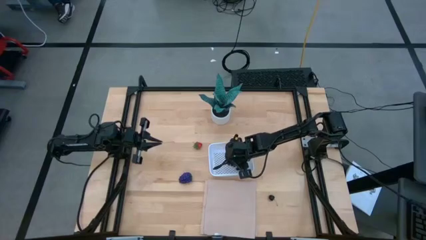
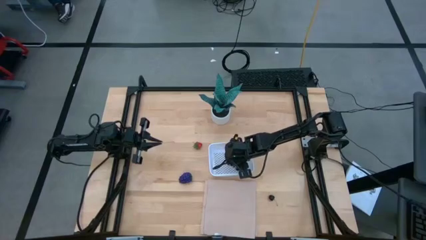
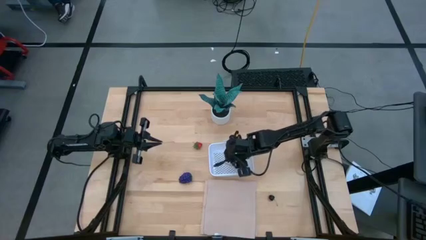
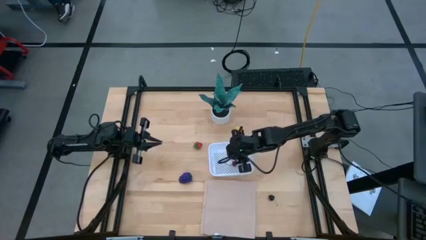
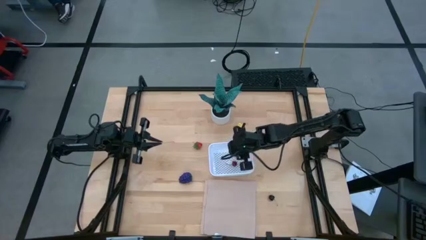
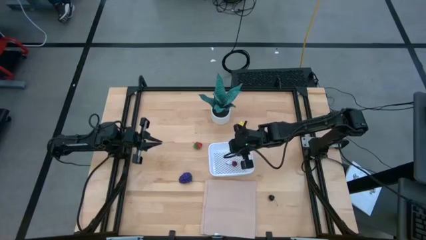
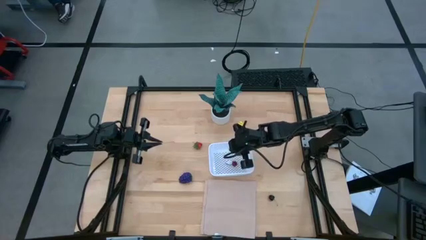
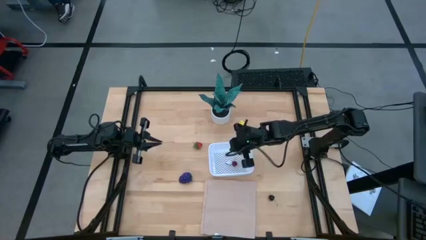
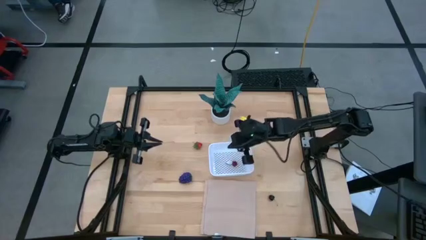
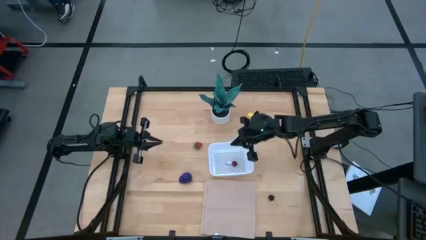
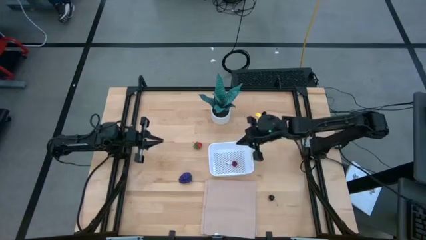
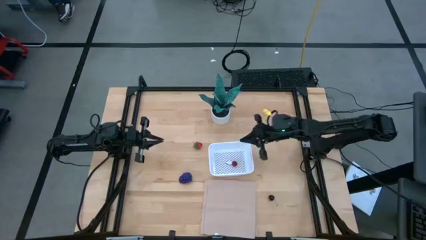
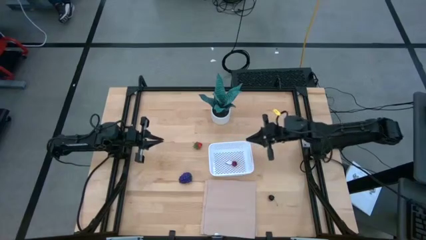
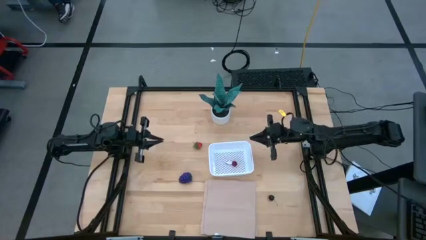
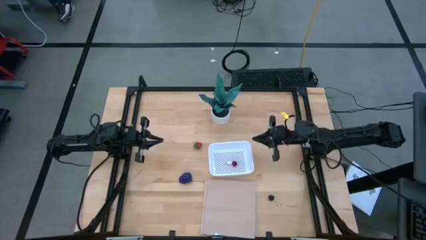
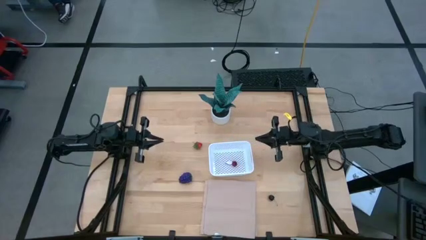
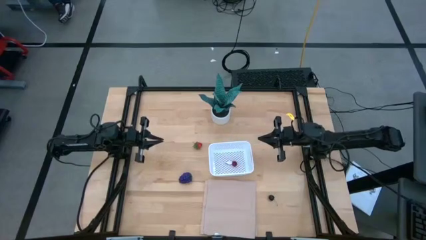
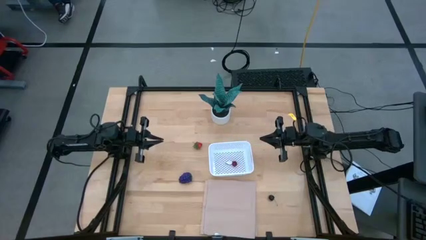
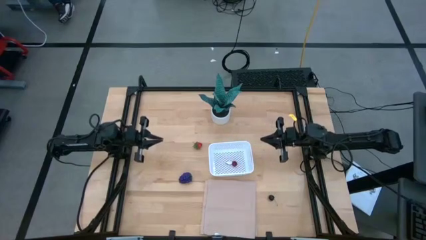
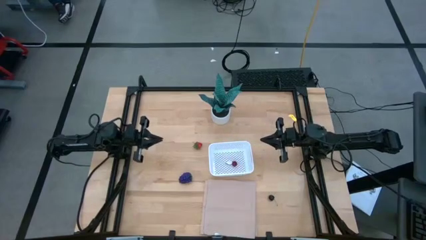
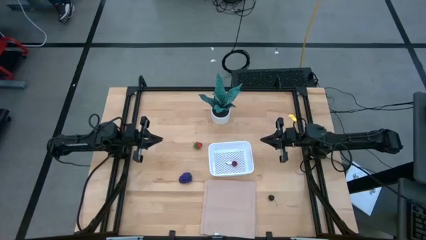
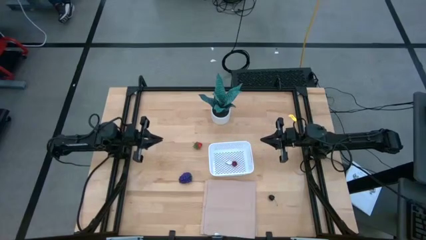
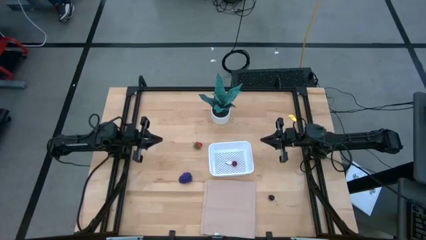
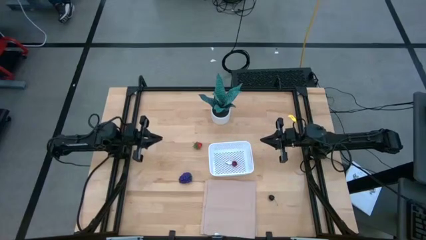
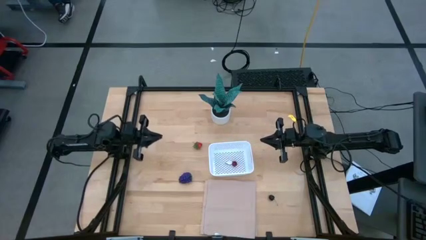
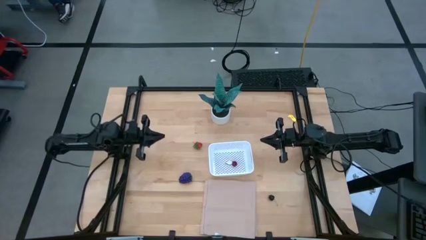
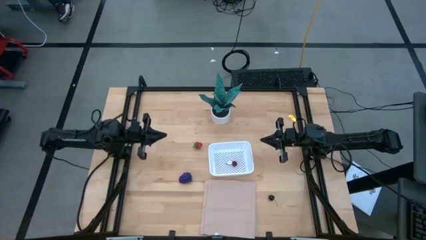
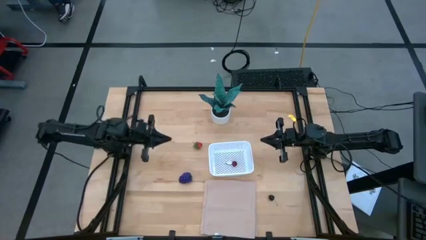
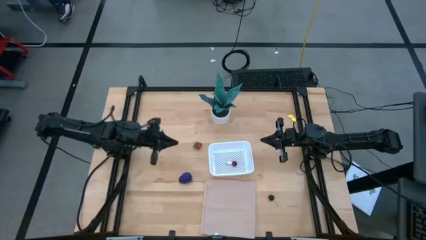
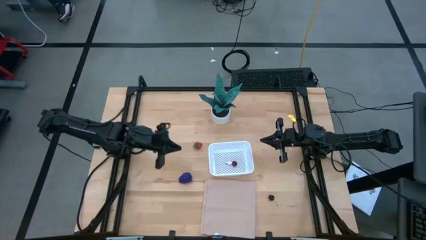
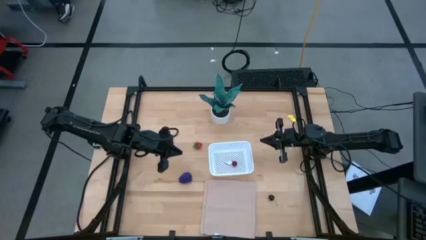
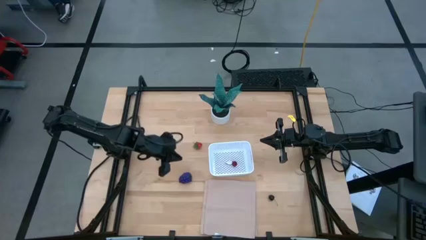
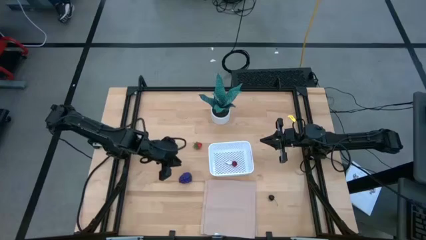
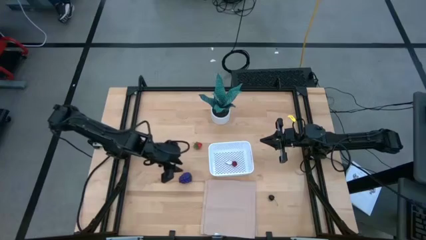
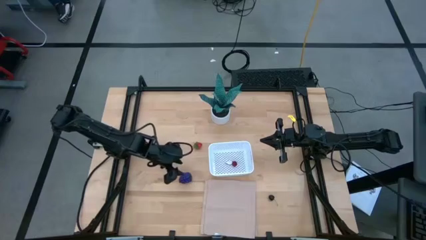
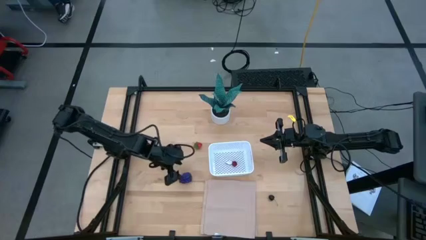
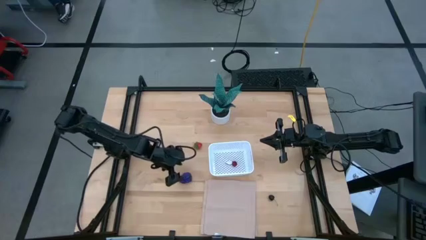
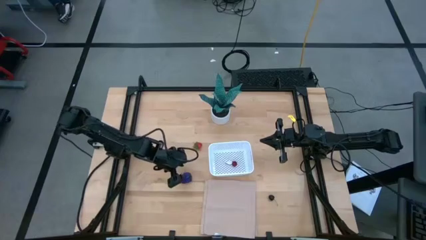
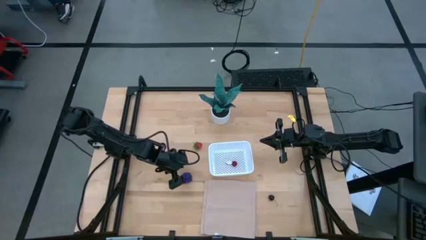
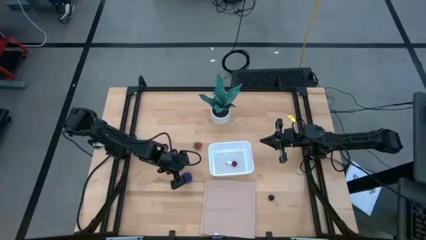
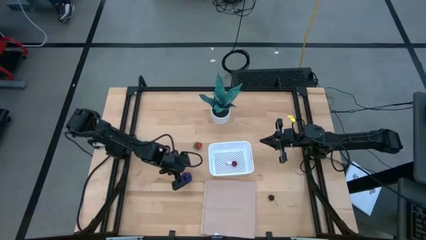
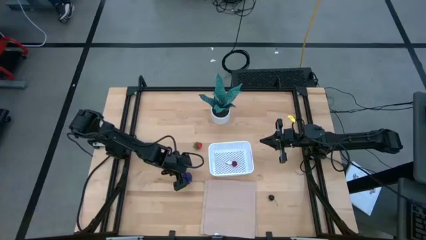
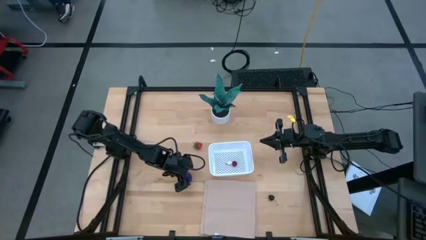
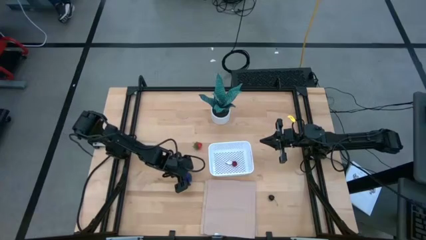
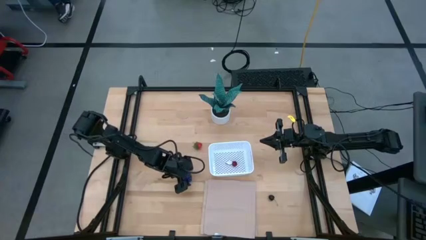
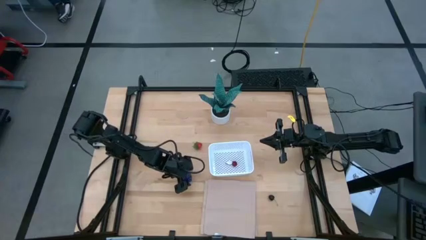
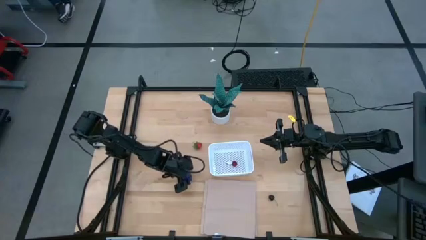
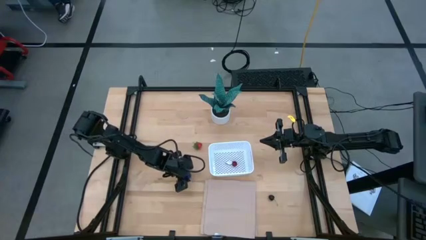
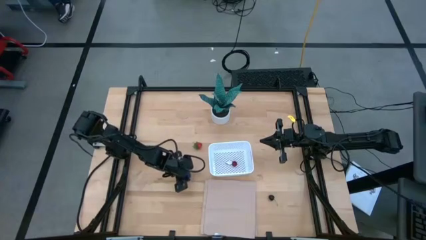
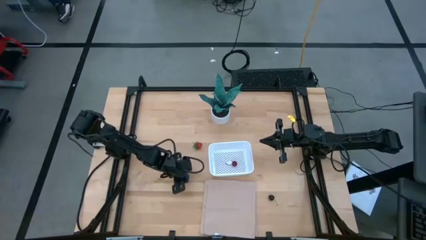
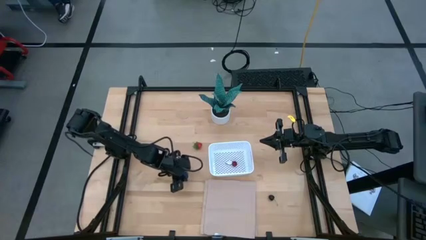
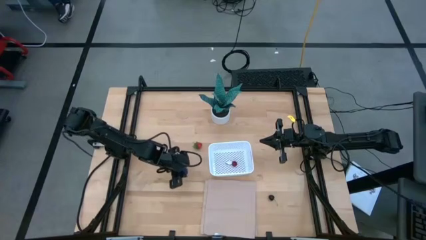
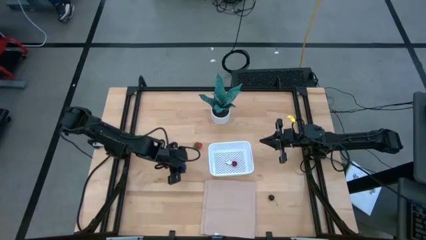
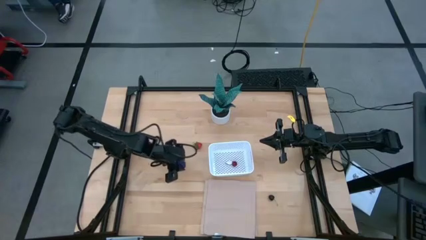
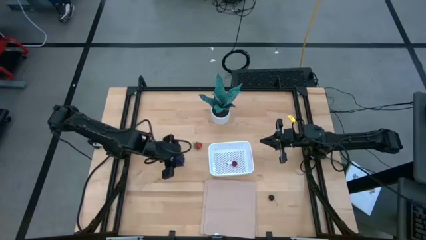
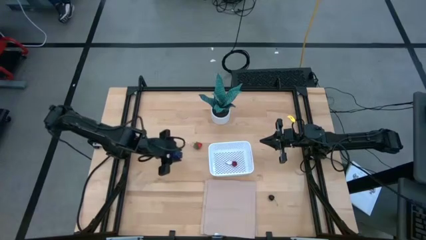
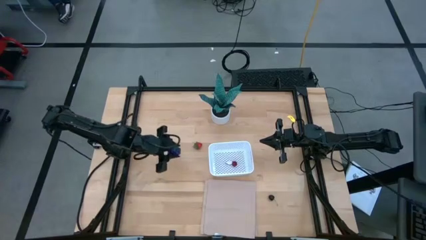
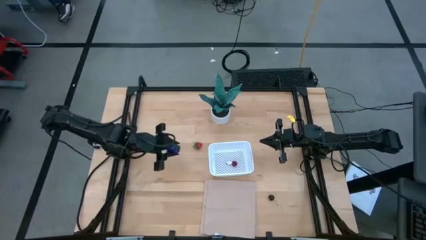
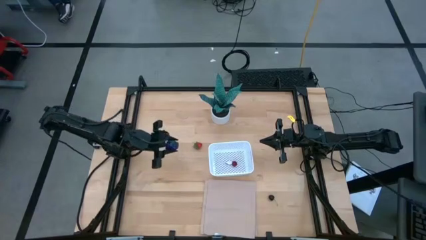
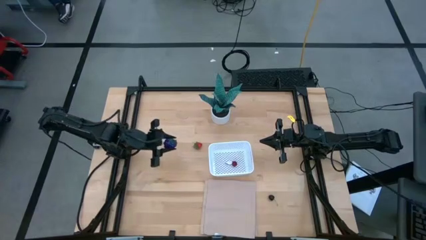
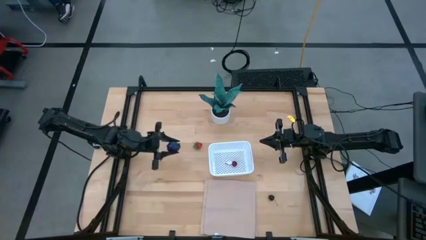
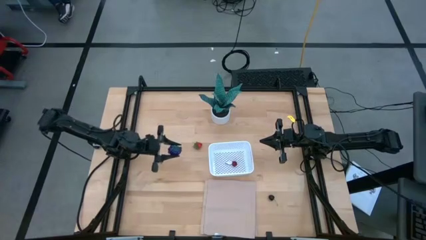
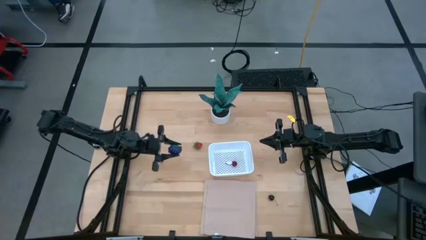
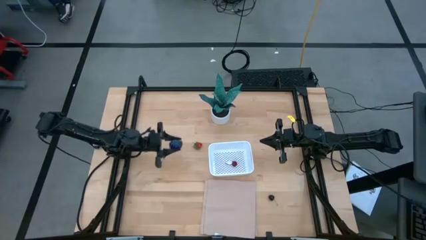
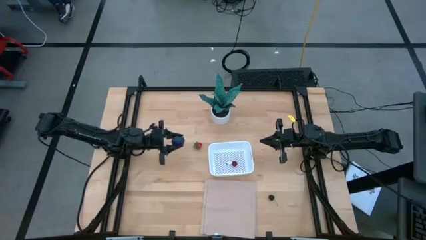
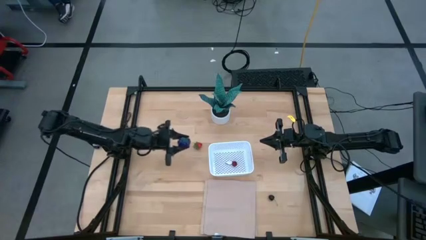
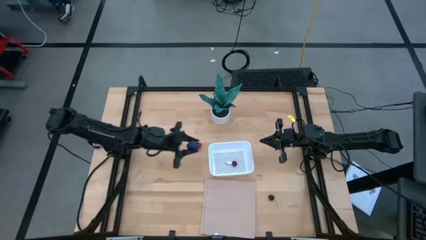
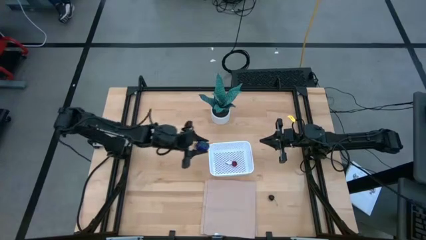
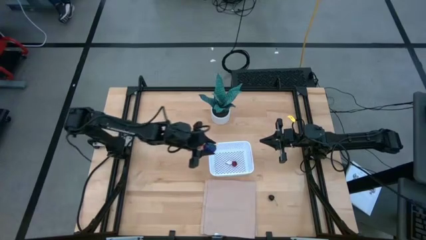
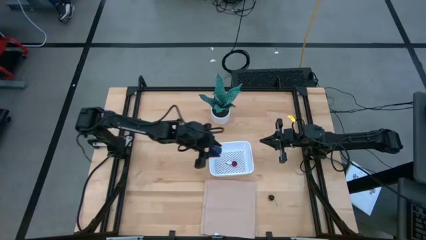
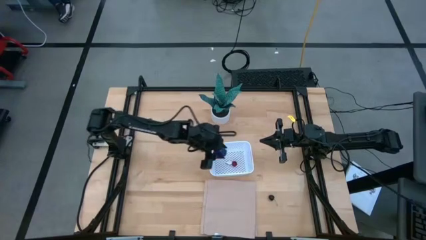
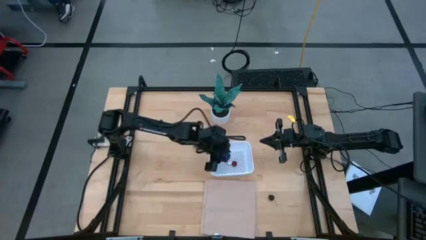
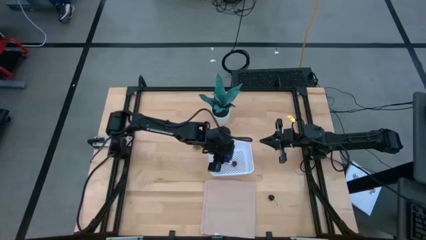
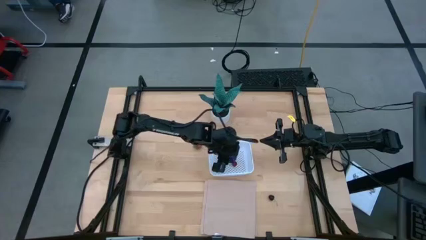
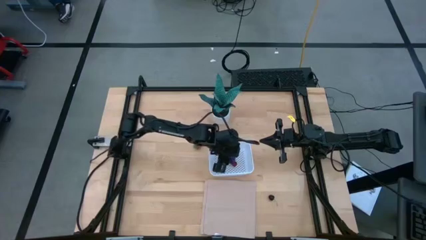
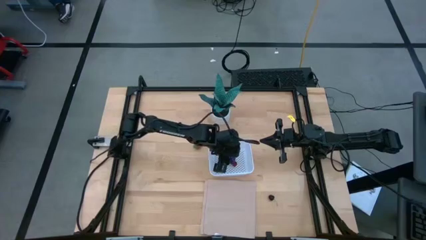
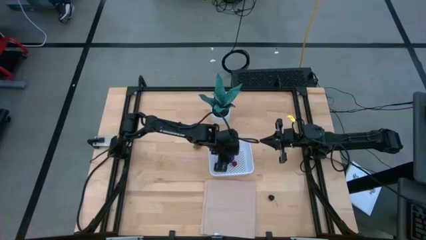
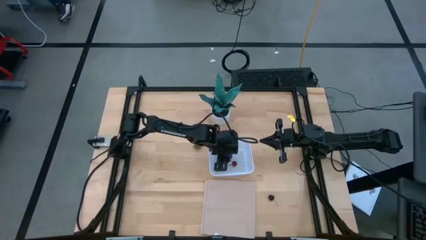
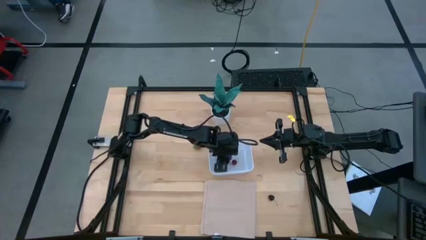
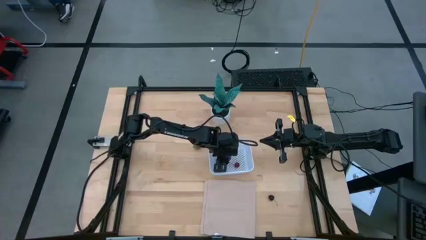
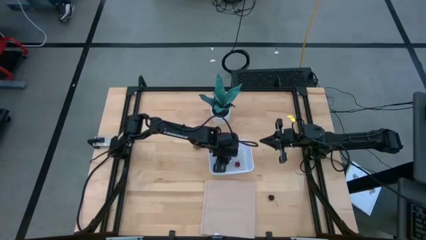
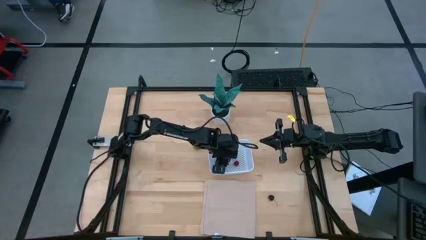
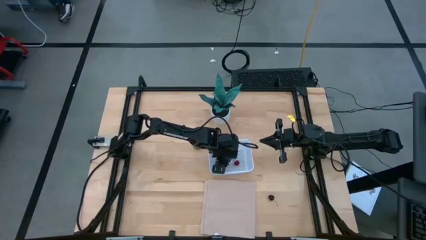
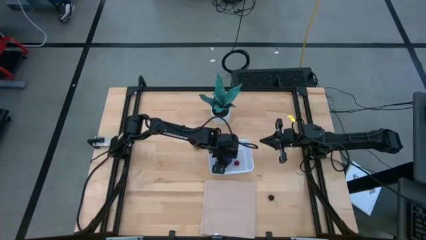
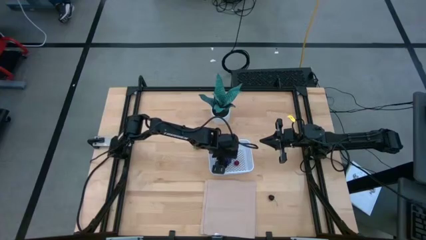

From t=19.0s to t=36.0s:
Task: Pick and placing Produce into tupperware
Put the grapes into the basket
